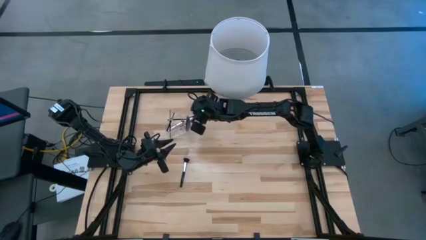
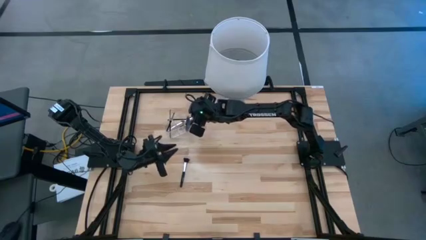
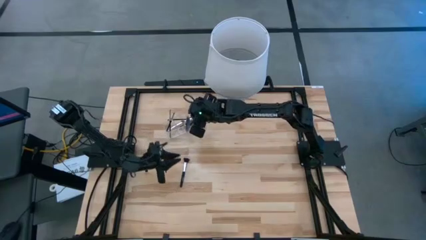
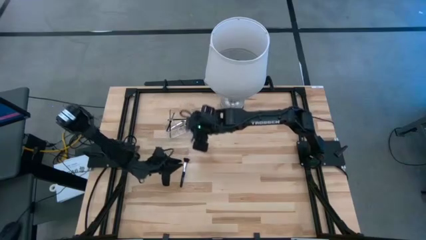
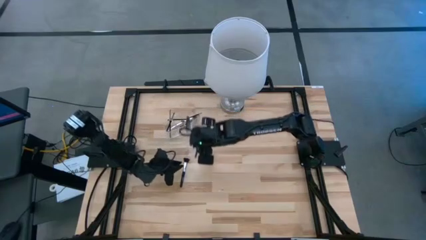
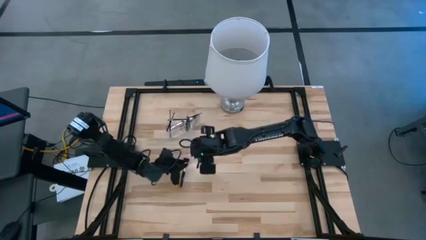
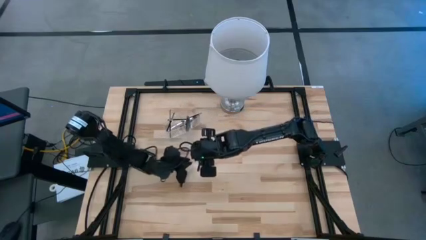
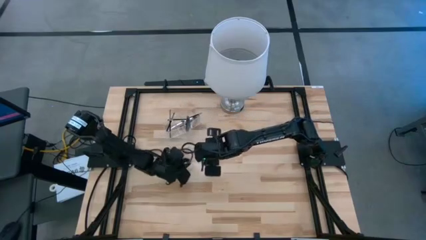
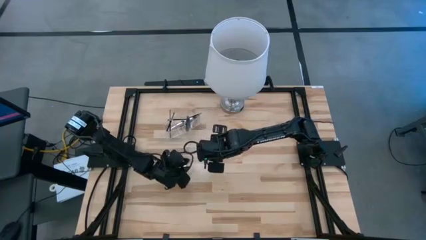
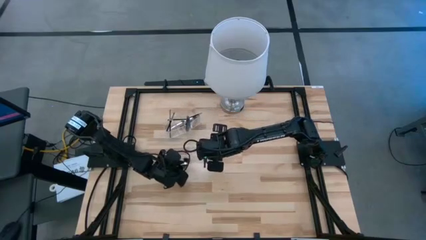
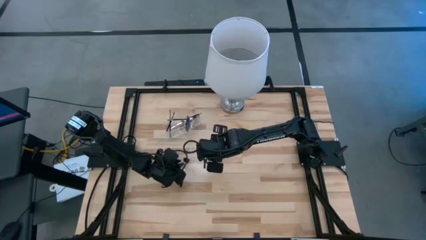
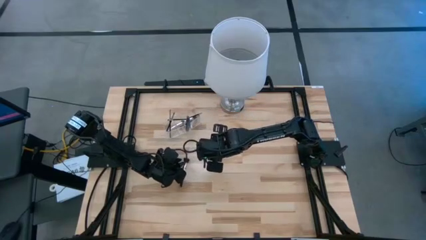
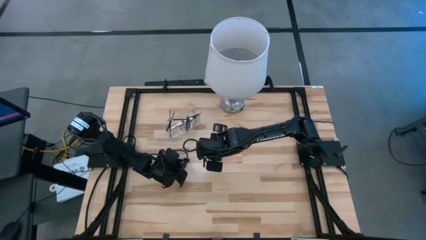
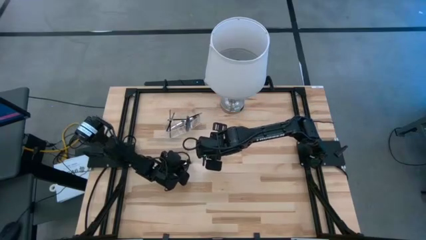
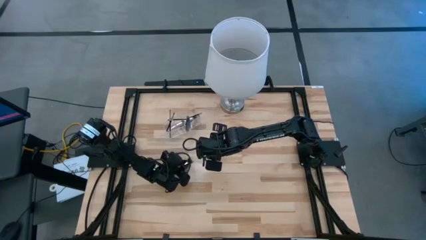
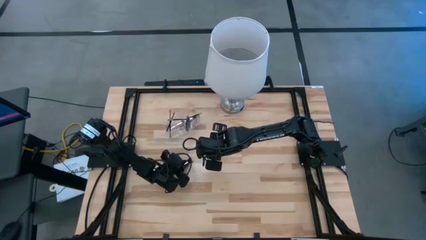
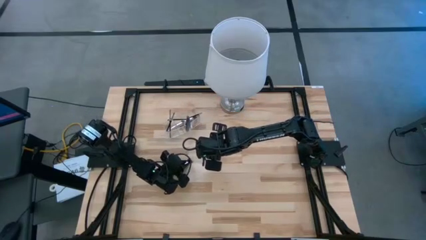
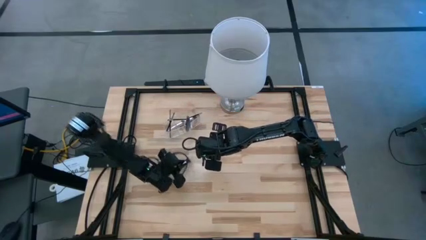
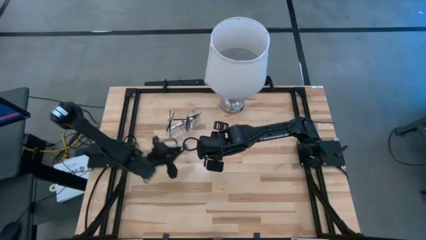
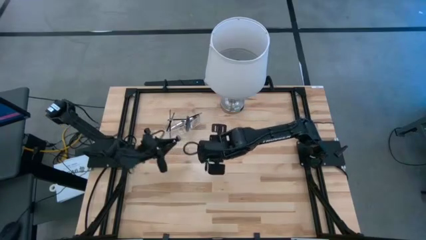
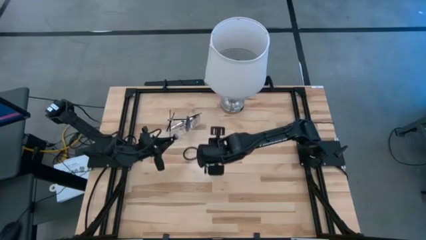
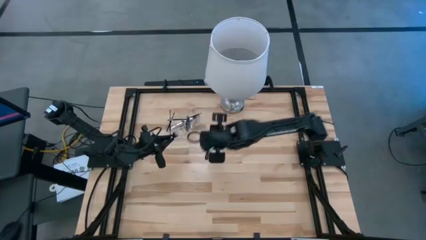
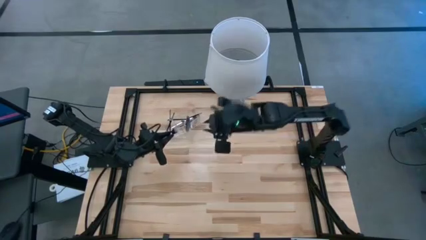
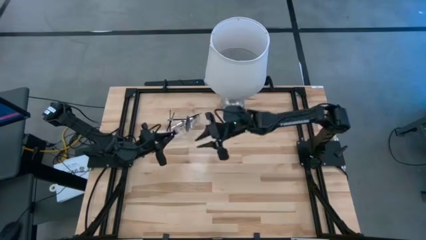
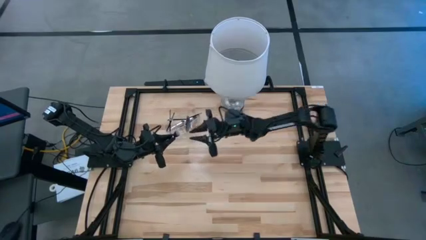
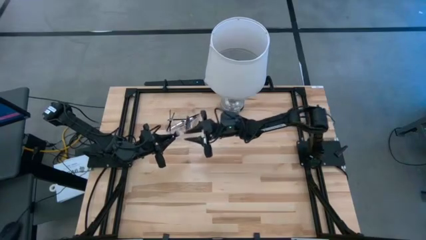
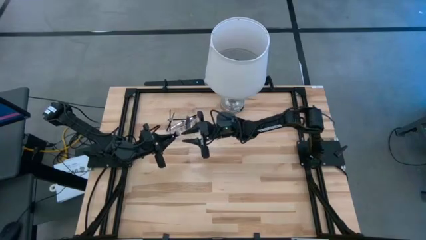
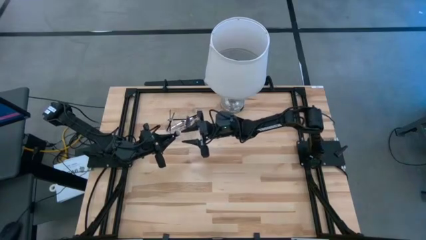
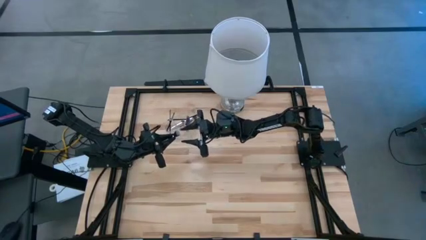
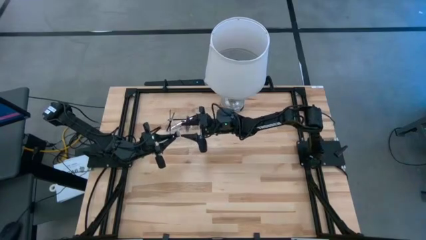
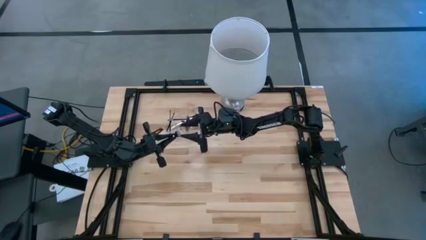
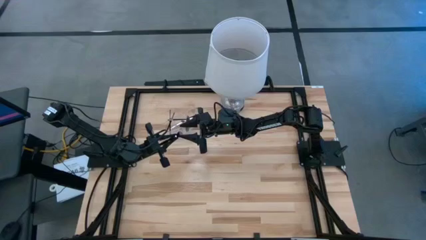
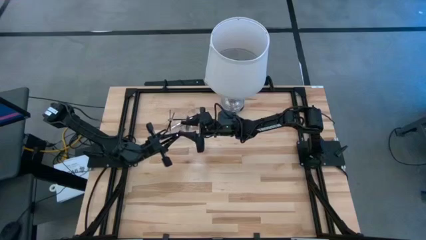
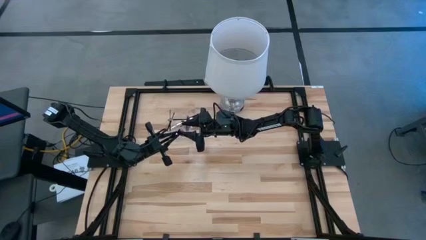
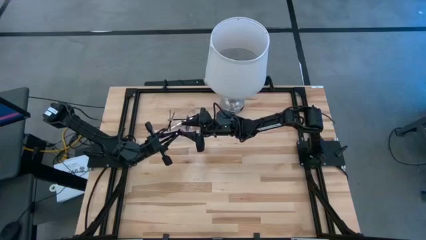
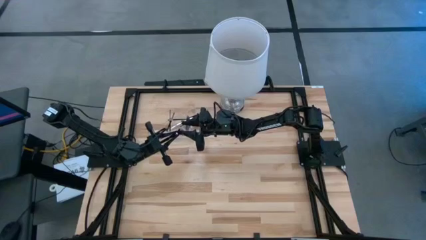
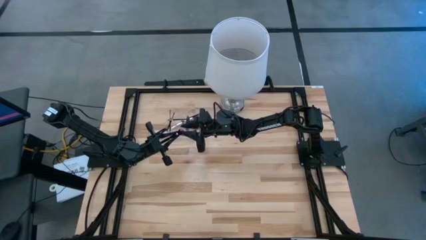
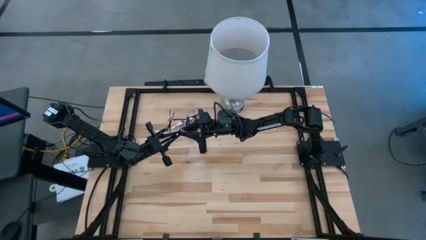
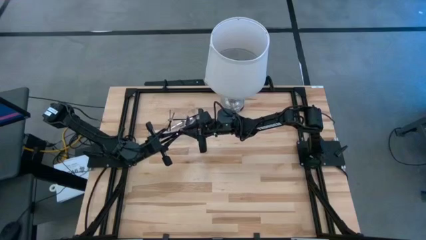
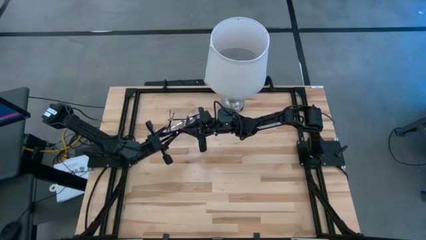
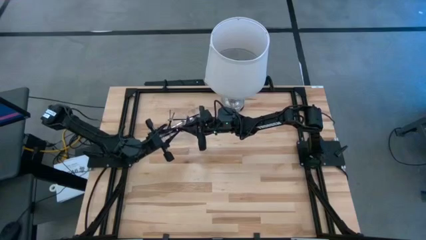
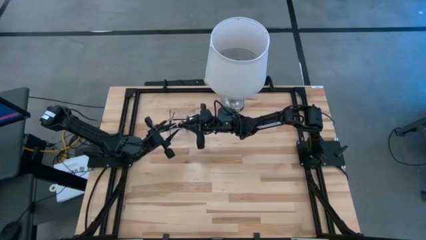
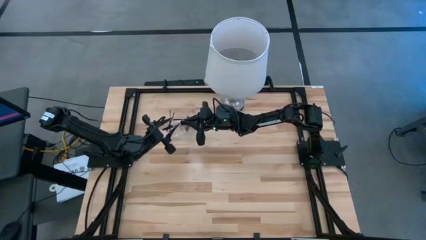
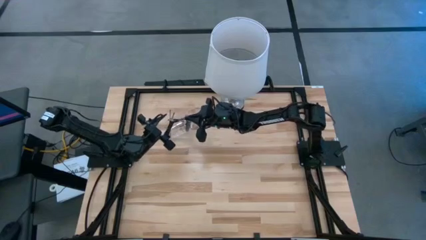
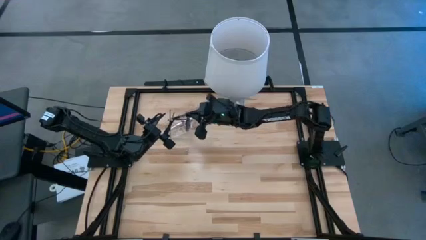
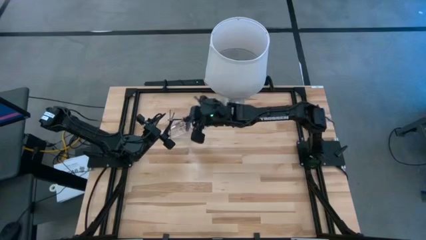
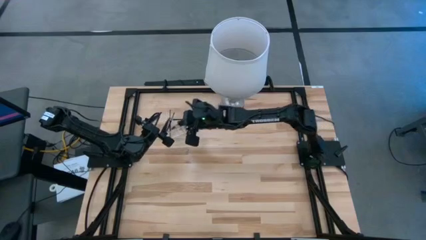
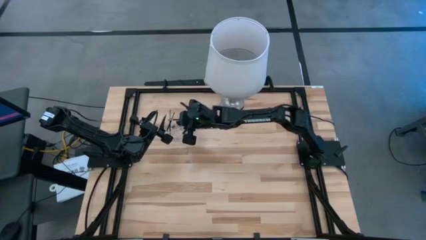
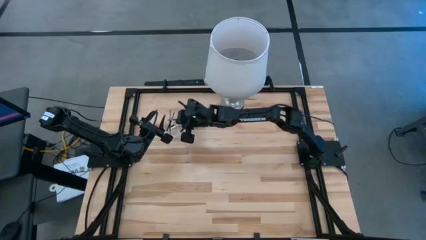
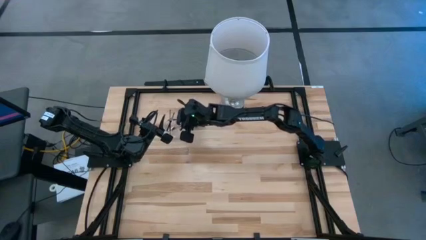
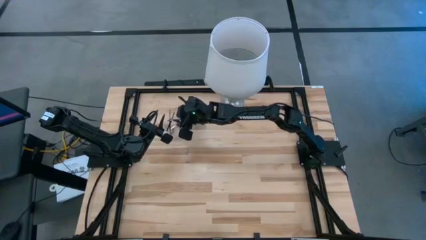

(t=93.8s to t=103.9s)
Task: Put items in baskets/containers
Put the black blush brush into the transparent organizer

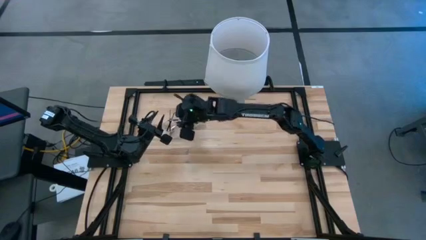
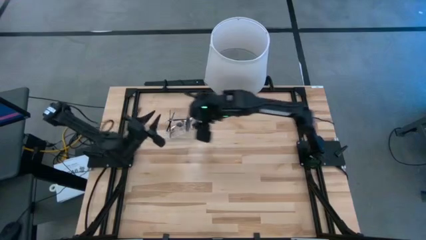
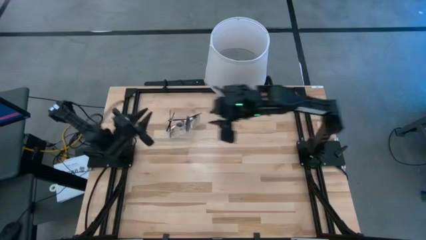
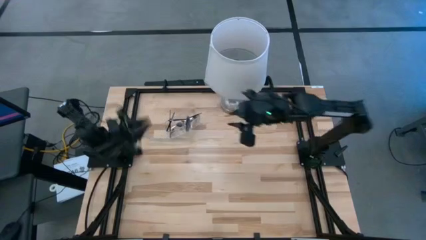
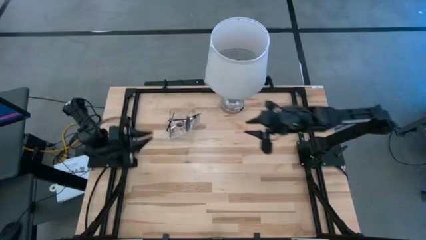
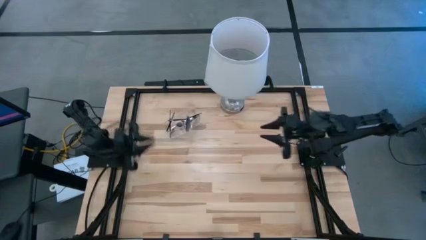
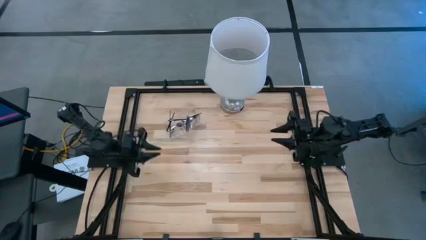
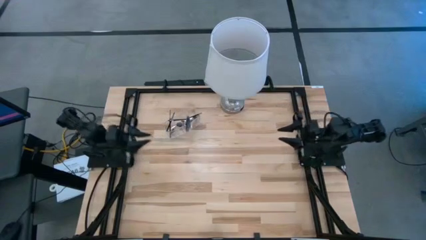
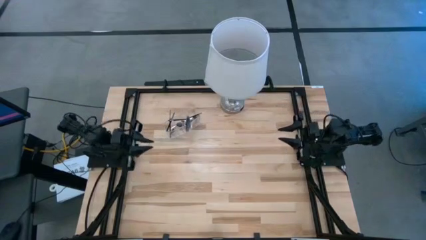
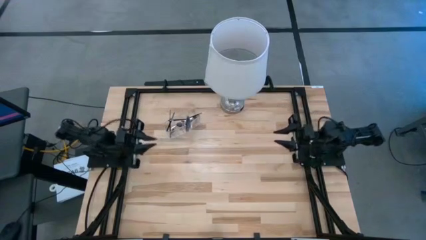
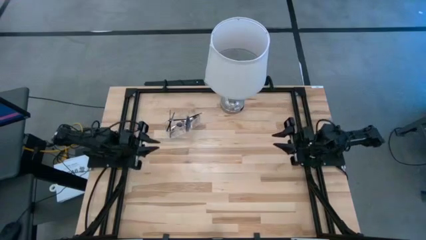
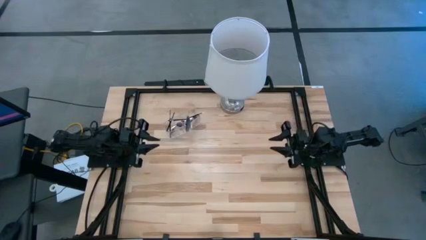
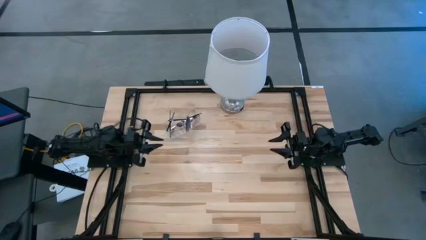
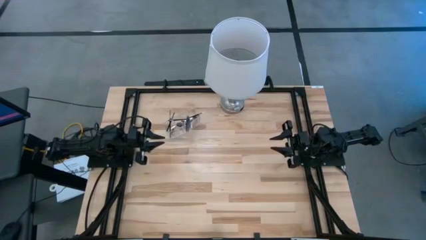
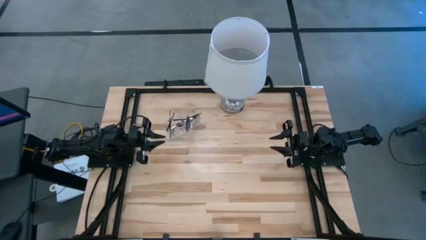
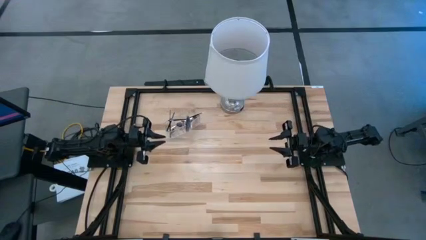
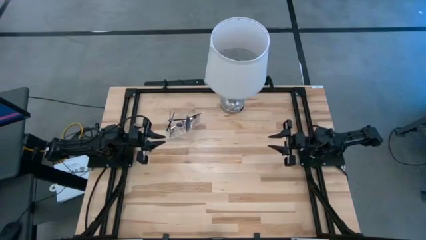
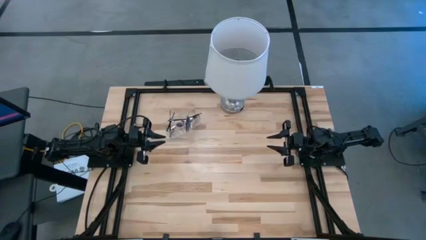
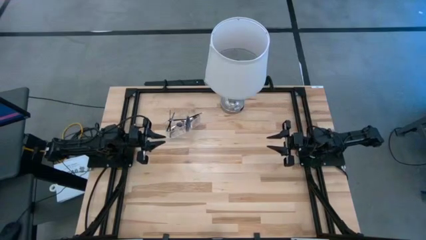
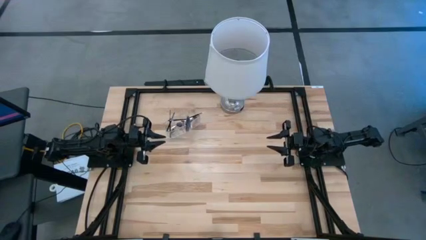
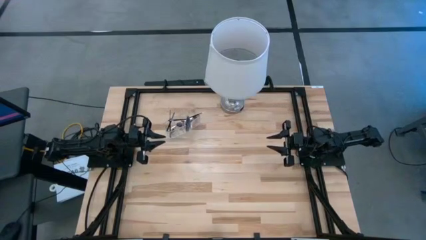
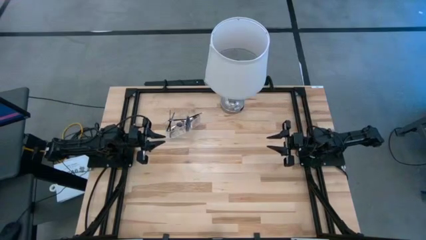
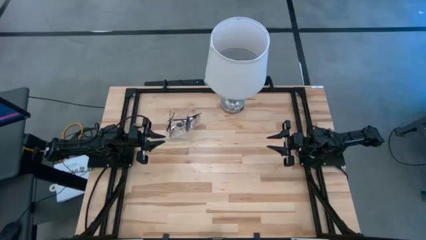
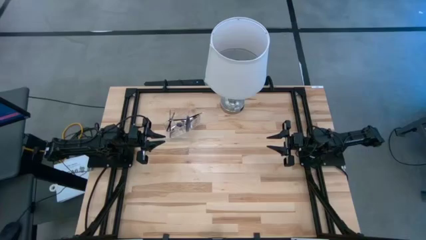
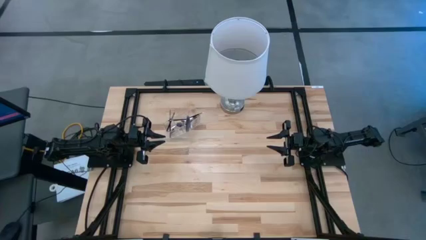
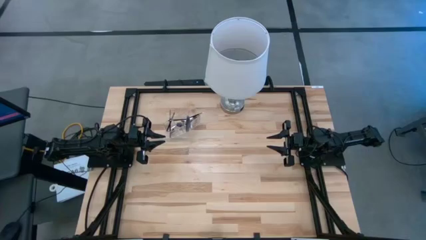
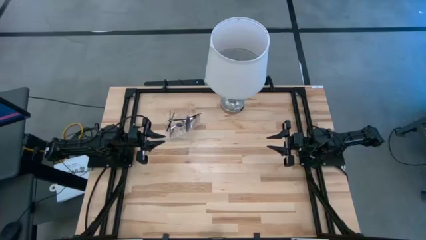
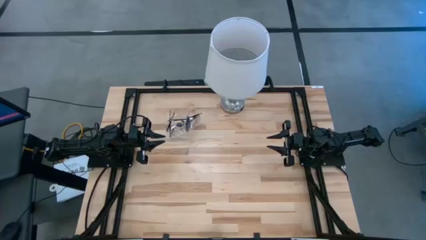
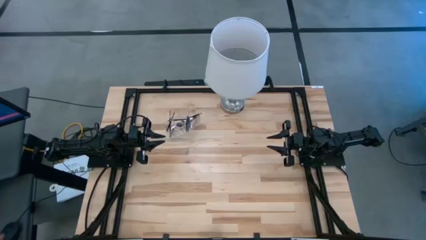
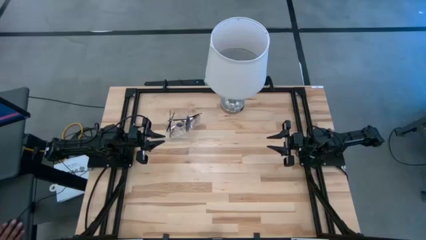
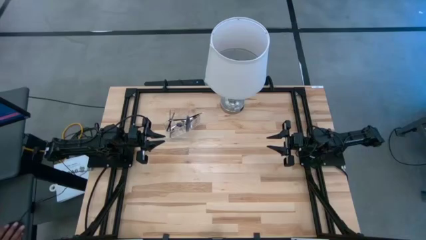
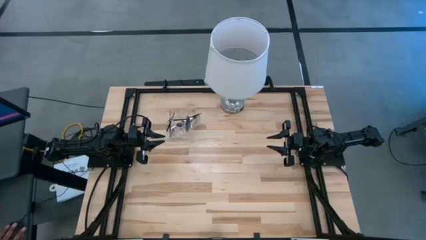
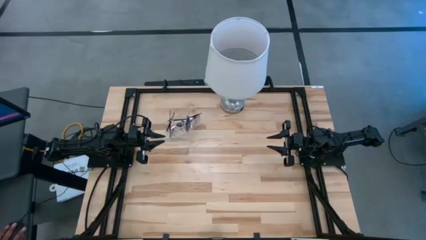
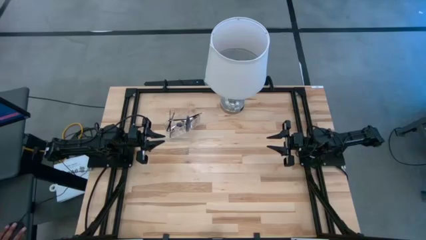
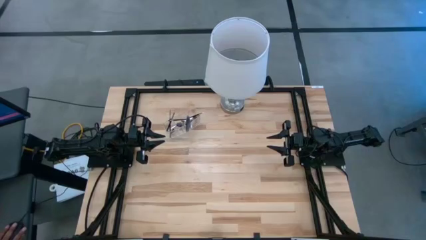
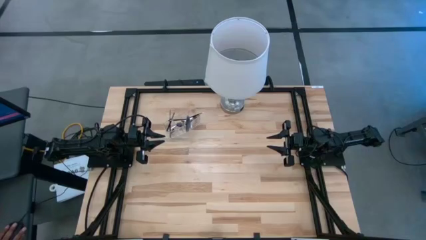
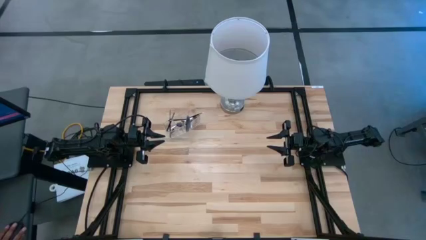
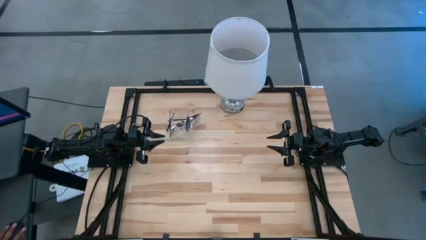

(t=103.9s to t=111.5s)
Return to Home Position
